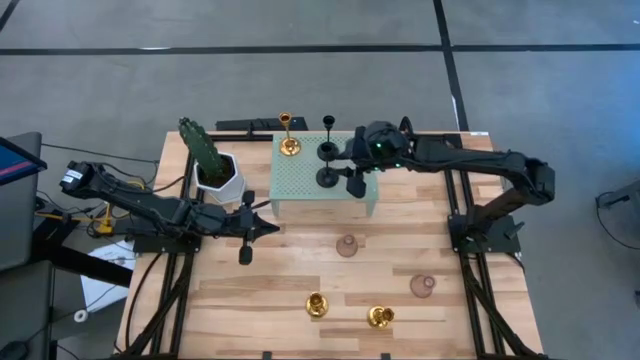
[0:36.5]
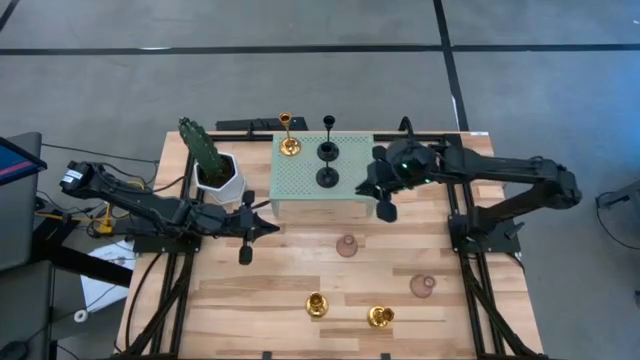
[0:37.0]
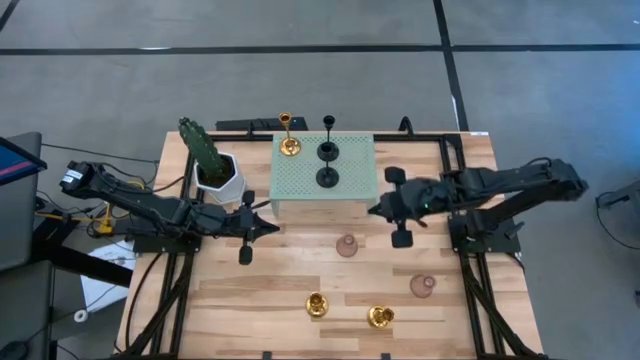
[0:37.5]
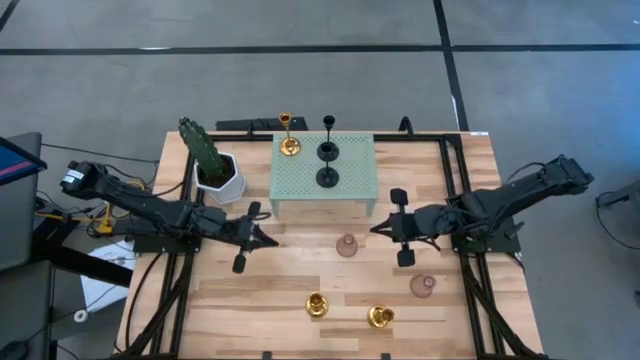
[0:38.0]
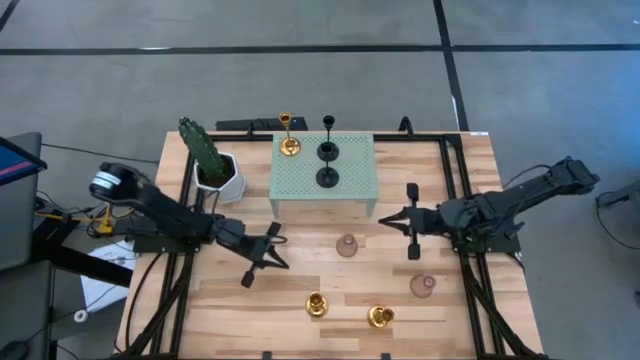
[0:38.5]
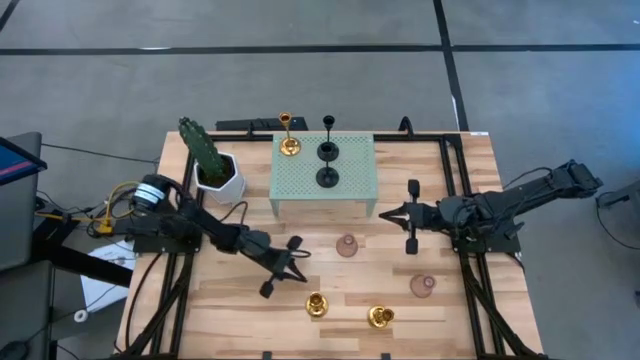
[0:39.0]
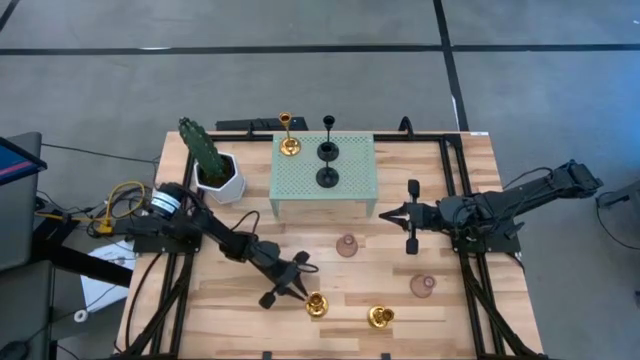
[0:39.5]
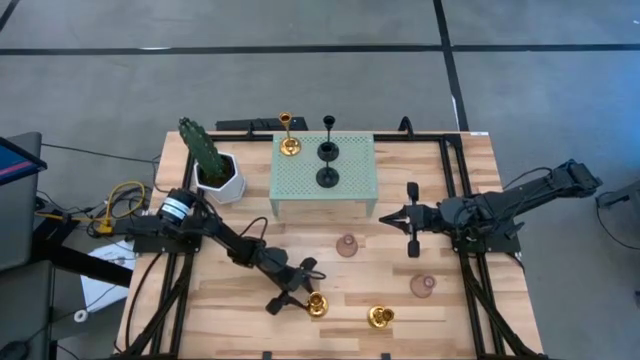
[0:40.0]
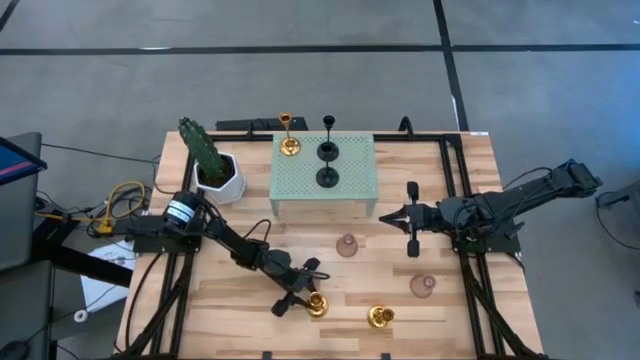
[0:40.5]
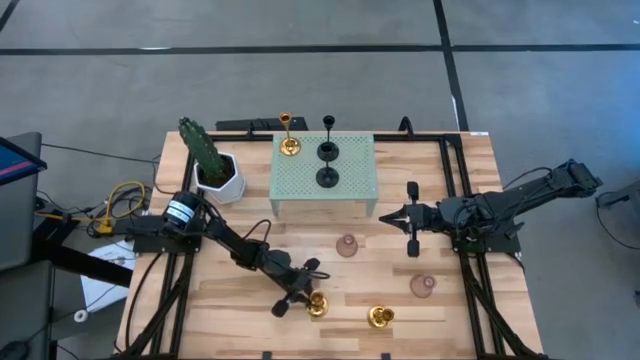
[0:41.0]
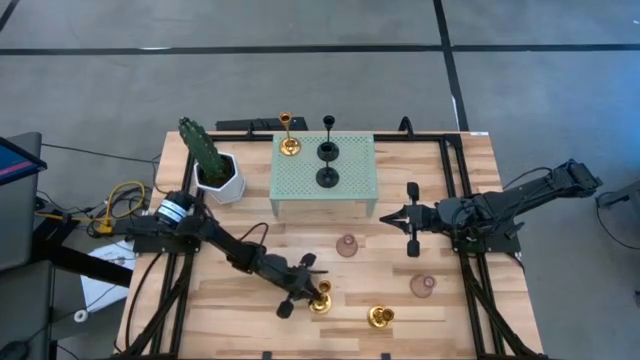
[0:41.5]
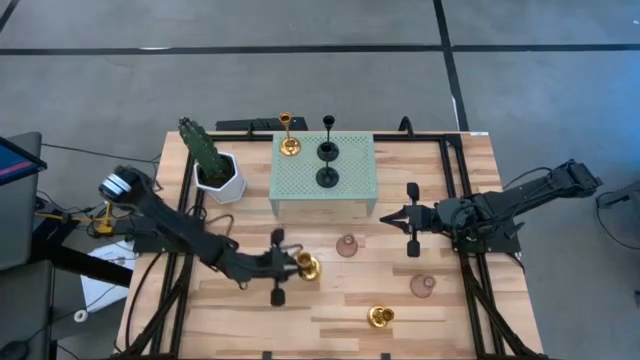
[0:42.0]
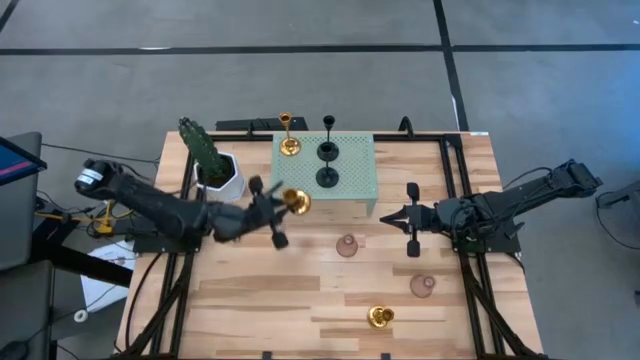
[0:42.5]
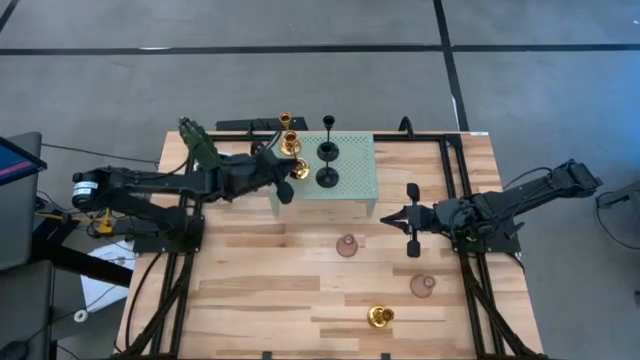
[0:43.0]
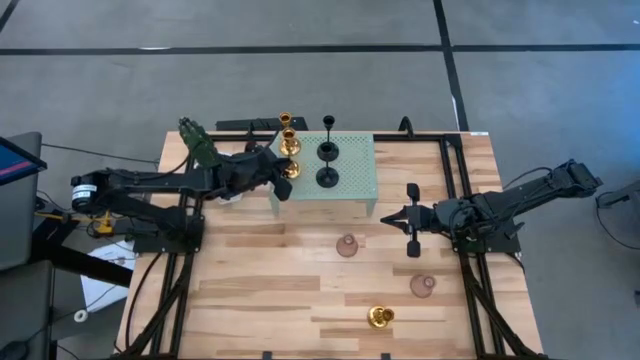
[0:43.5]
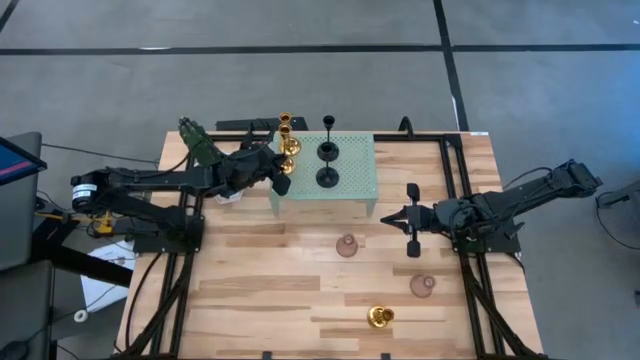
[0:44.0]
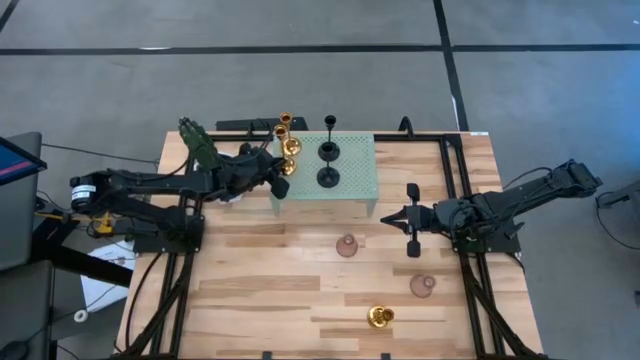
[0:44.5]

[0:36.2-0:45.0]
Task: Pick & Place candle stick holders
Put the left gold candle holder on the shelf

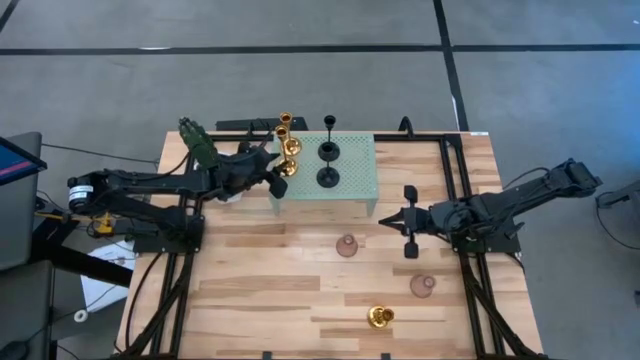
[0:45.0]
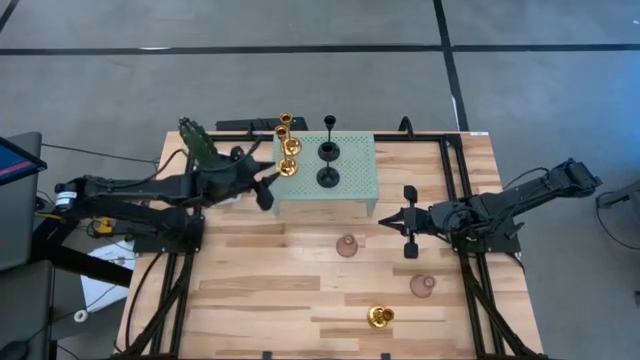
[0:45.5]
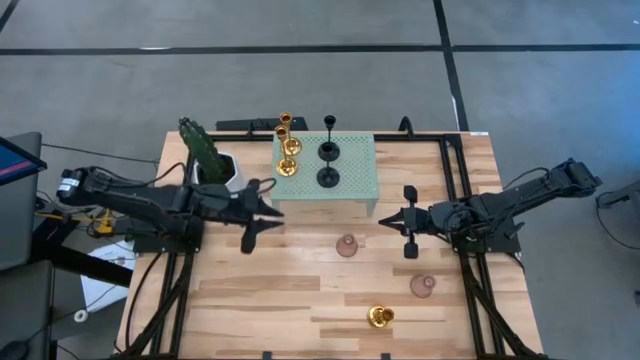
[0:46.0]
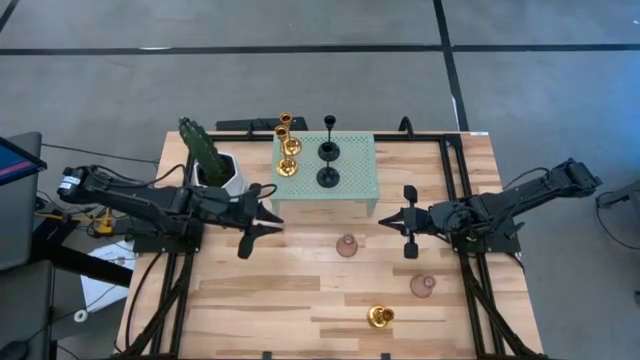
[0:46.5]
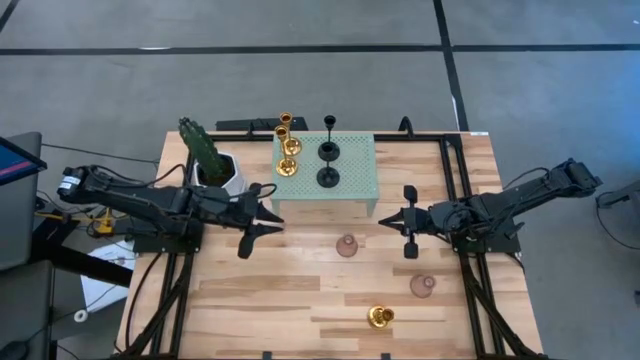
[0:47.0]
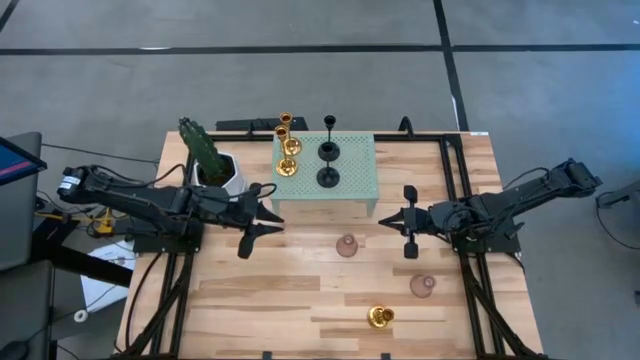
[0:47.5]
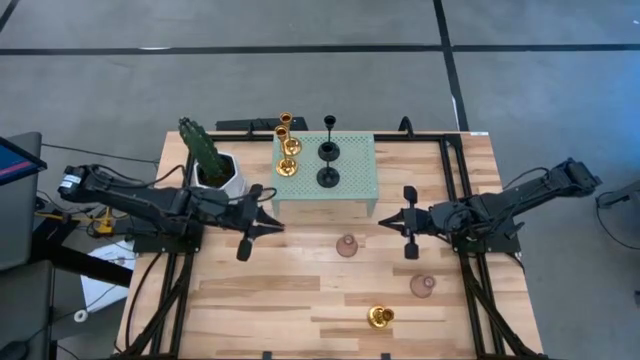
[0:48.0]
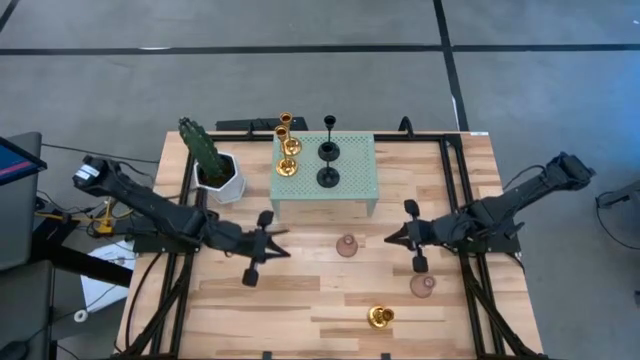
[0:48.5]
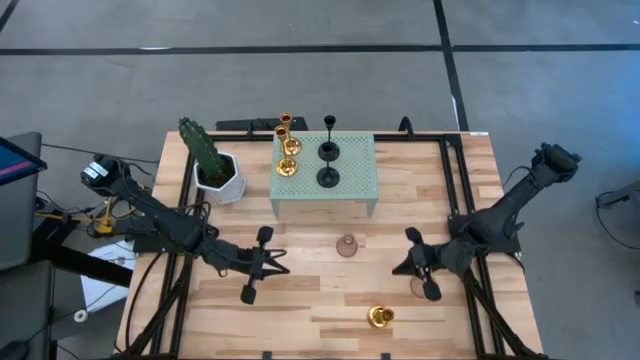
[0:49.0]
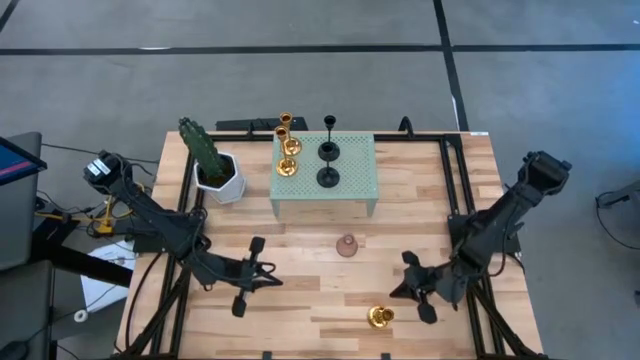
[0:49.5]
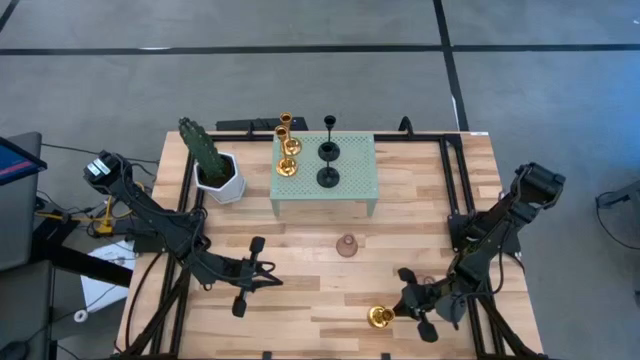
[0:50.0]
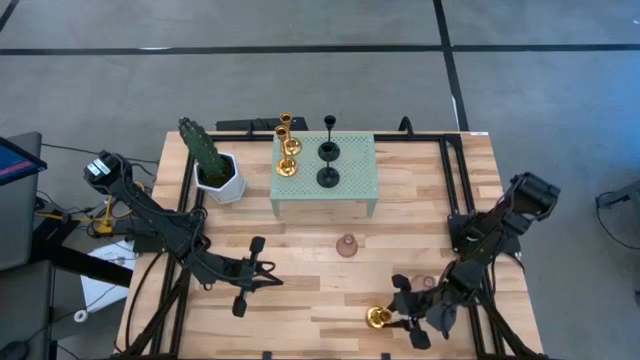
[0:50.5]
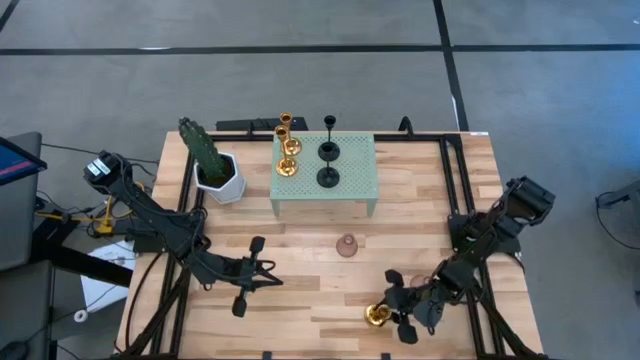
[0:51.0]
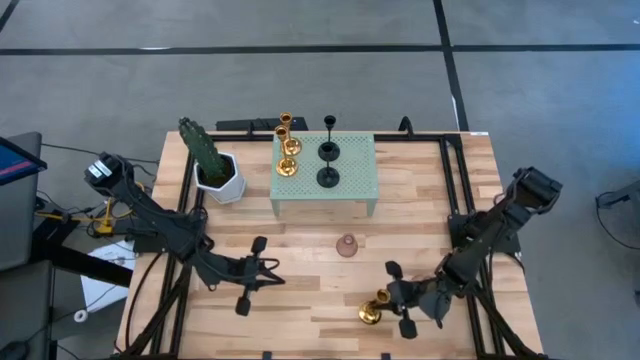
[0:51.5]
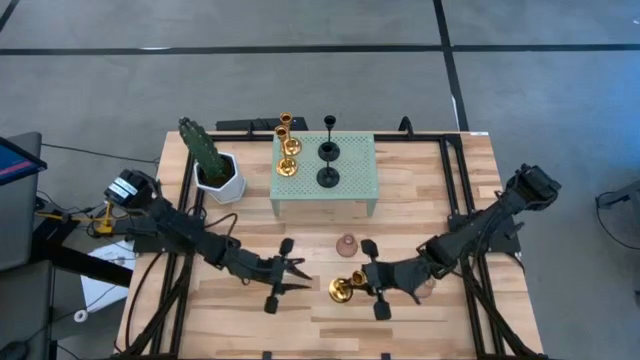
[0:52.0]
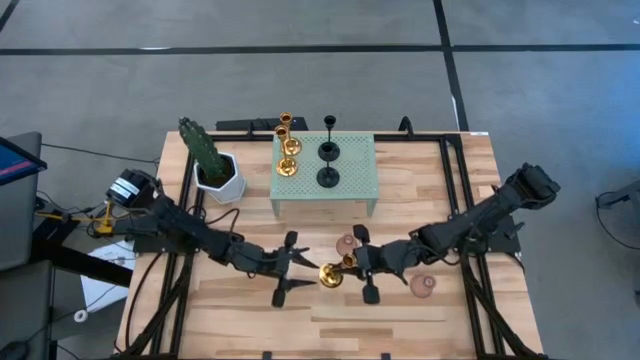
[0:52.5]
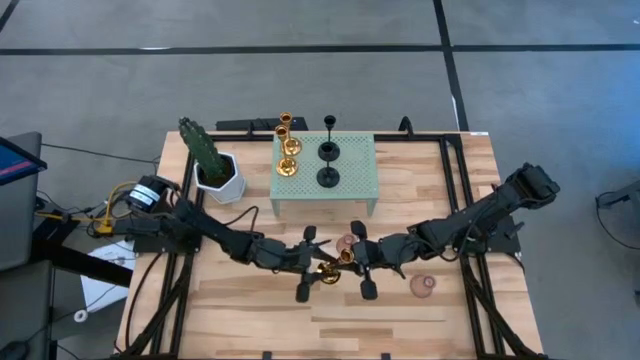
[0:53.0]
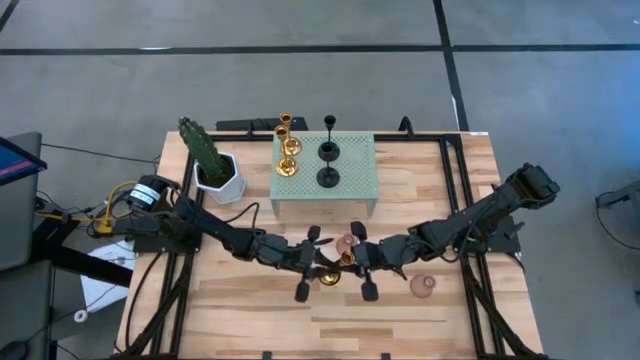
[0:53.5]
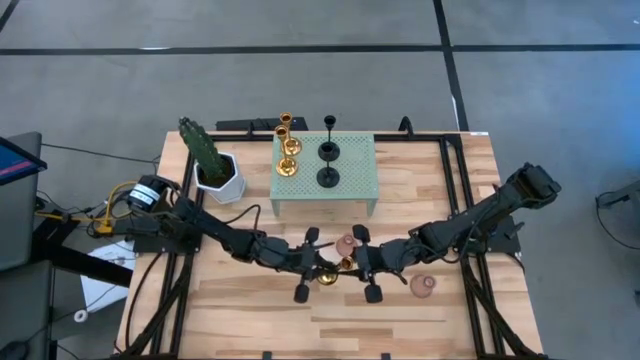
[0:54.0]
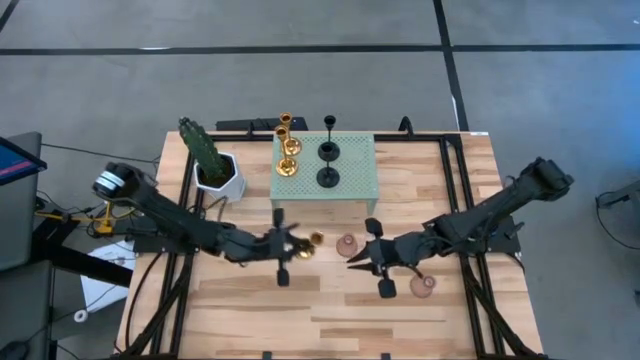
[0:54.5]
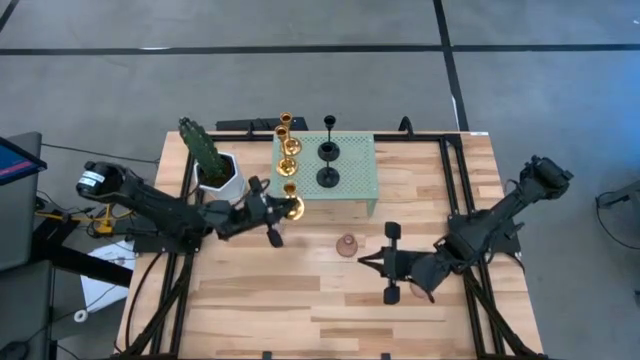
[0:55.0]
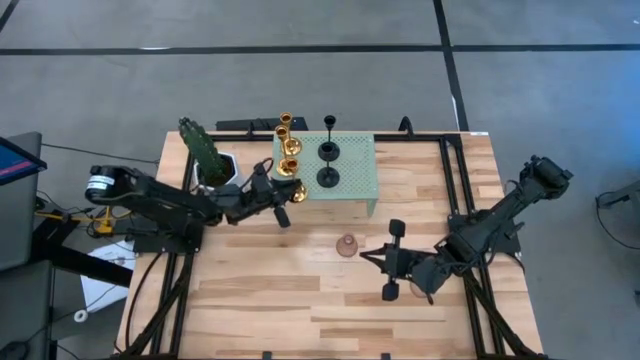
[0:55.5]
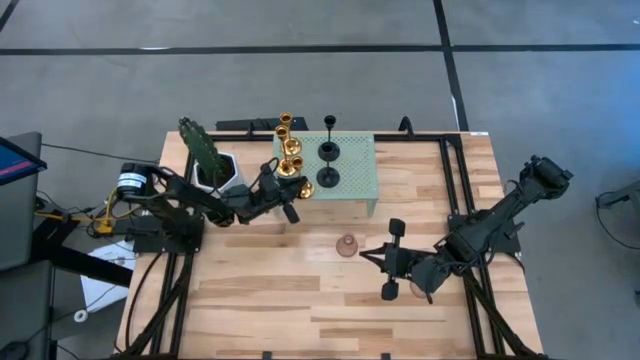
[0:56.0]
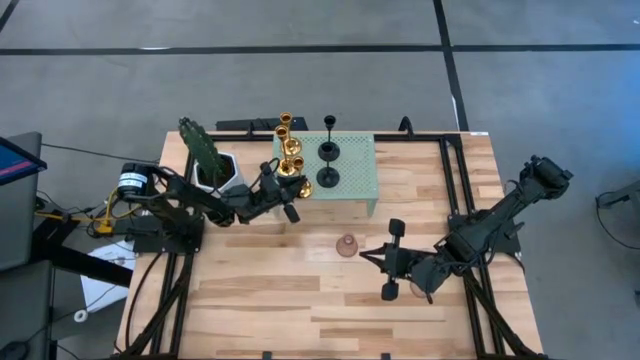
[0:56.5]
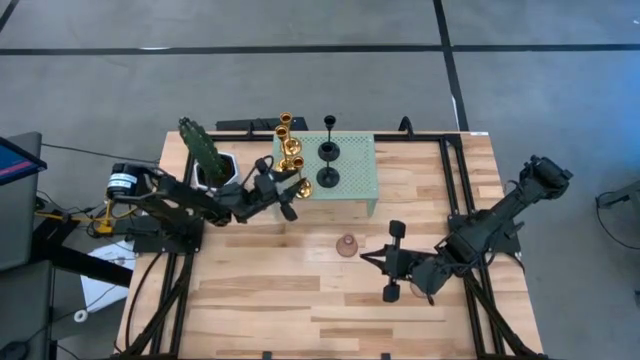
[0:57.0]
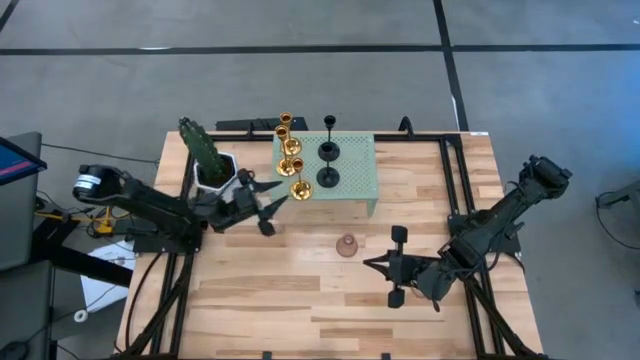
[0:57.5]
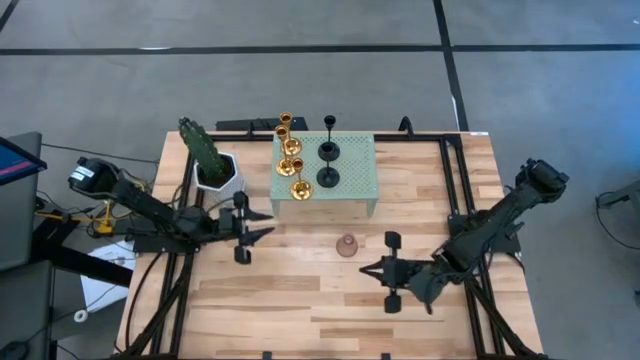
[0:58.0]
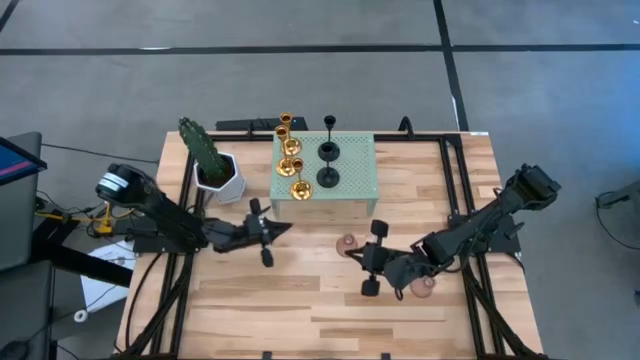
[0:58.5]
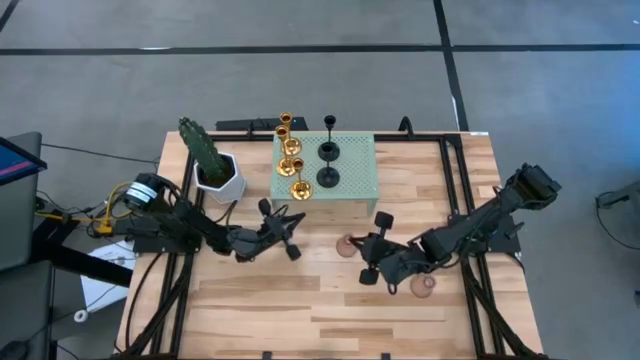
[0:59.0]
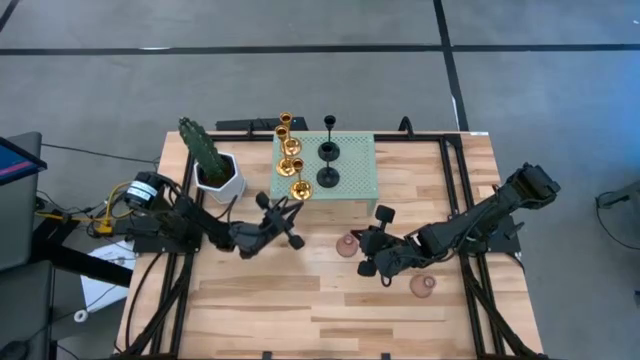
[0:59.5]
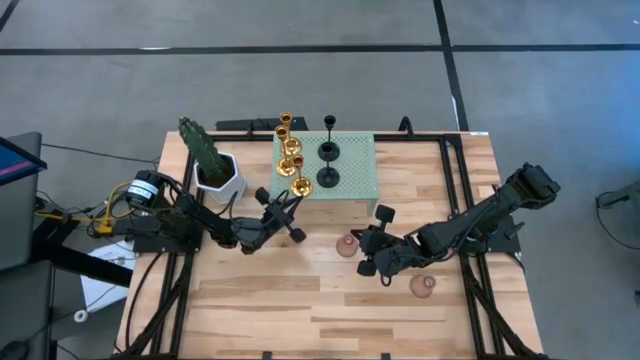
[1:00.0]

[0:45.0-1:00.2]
Put the gold candle holder on the shelf
